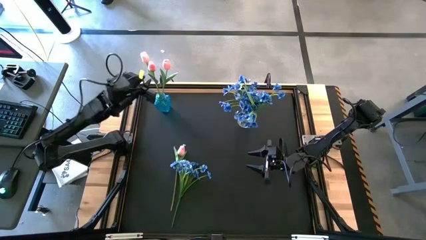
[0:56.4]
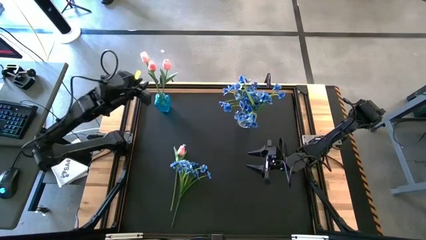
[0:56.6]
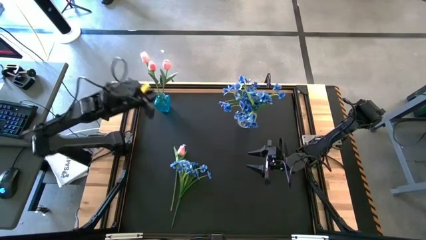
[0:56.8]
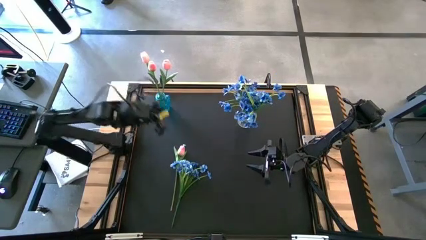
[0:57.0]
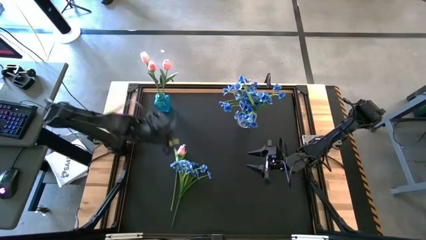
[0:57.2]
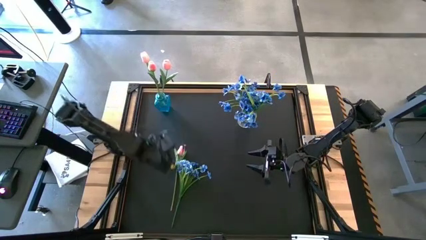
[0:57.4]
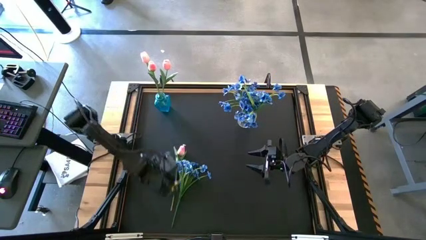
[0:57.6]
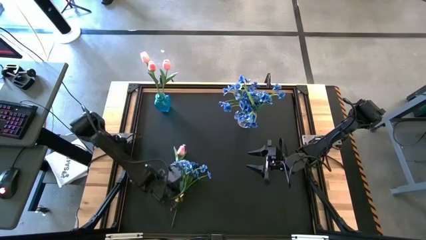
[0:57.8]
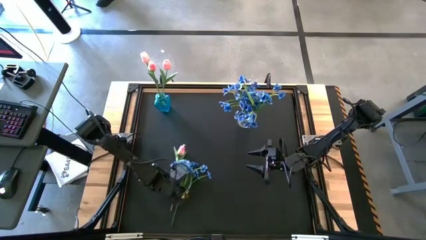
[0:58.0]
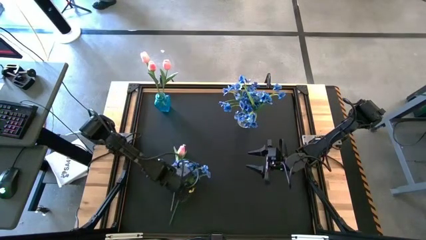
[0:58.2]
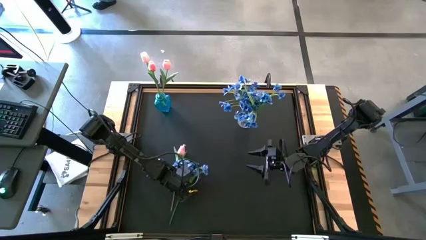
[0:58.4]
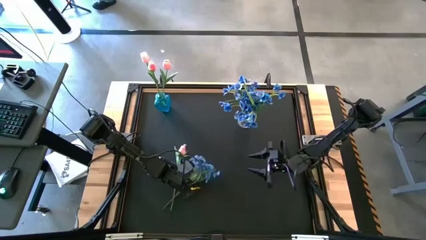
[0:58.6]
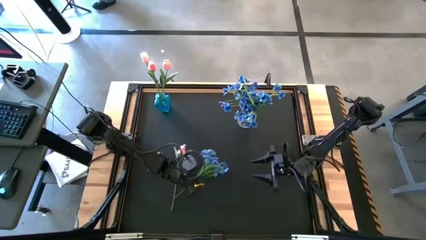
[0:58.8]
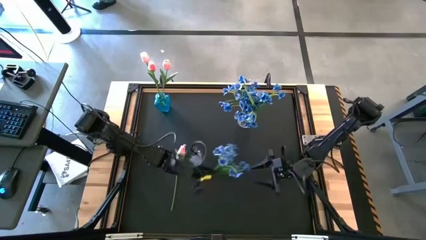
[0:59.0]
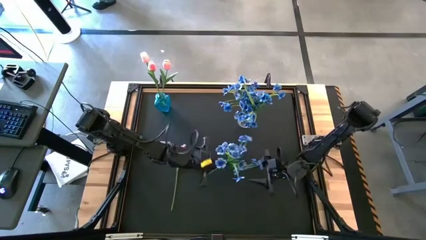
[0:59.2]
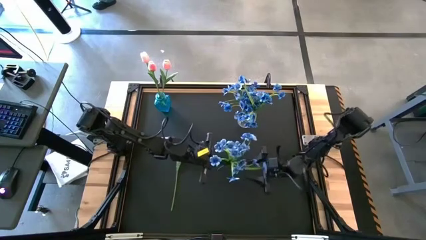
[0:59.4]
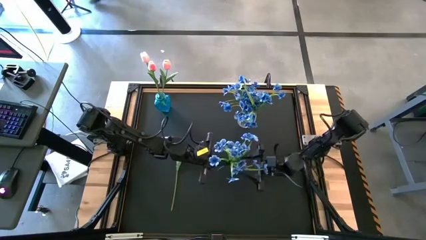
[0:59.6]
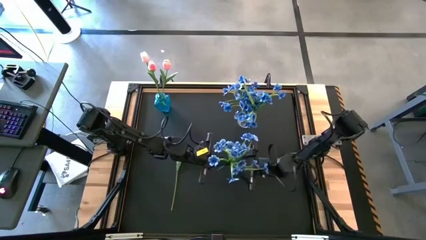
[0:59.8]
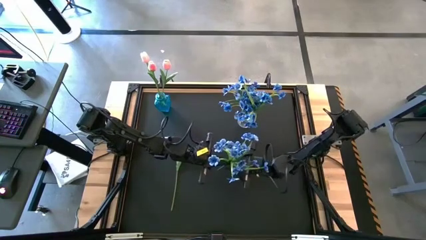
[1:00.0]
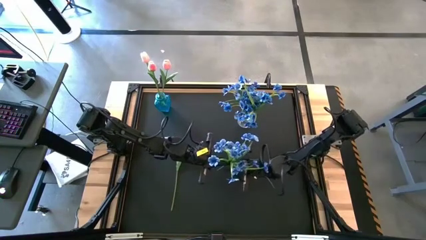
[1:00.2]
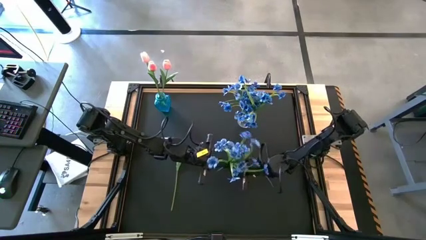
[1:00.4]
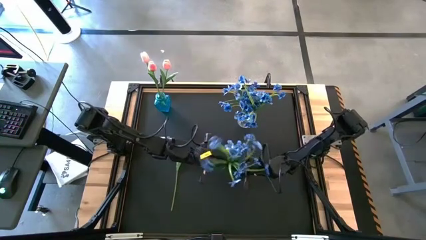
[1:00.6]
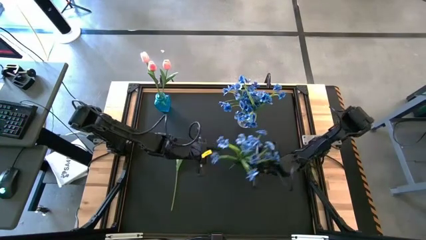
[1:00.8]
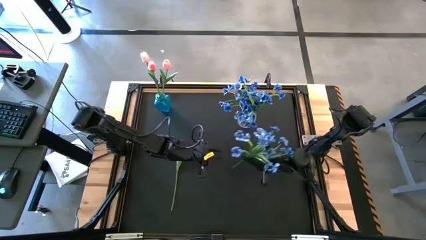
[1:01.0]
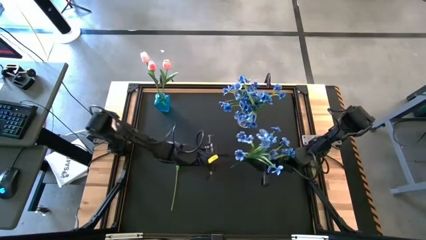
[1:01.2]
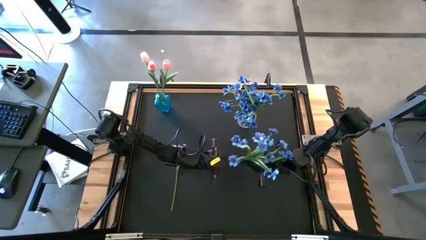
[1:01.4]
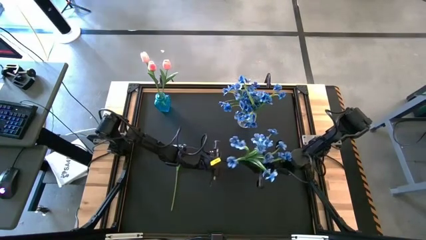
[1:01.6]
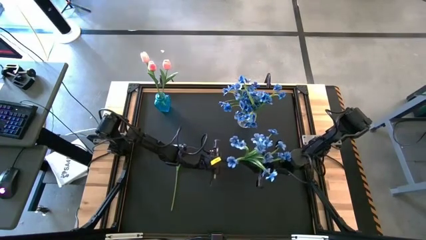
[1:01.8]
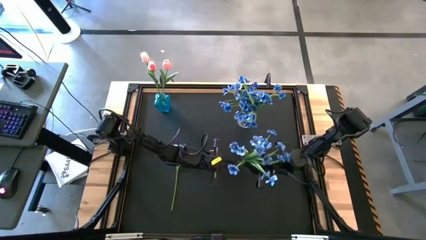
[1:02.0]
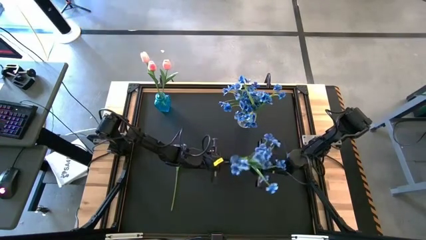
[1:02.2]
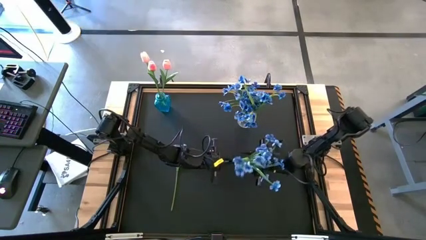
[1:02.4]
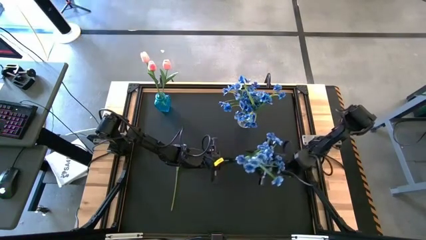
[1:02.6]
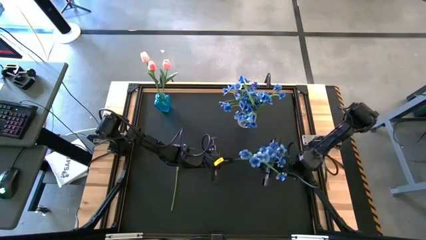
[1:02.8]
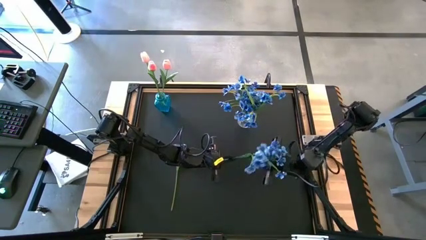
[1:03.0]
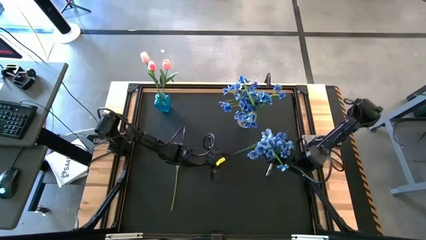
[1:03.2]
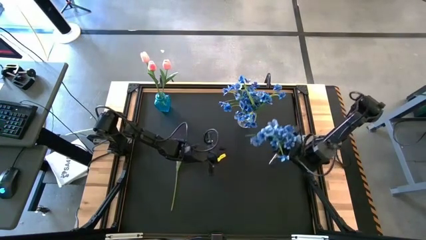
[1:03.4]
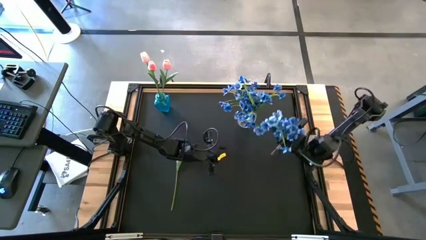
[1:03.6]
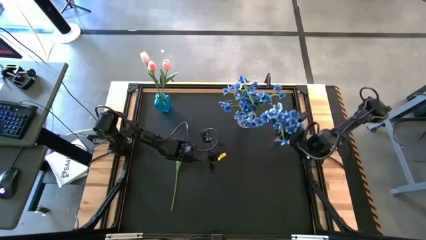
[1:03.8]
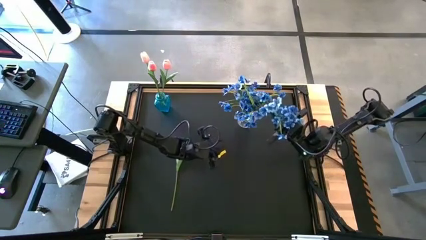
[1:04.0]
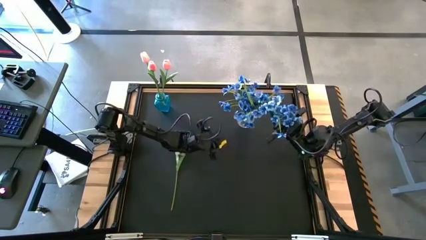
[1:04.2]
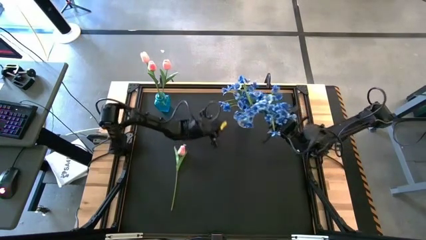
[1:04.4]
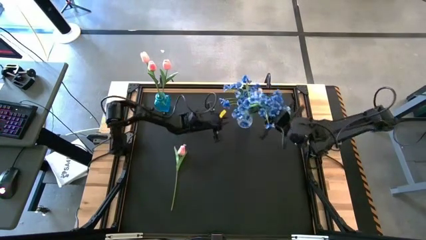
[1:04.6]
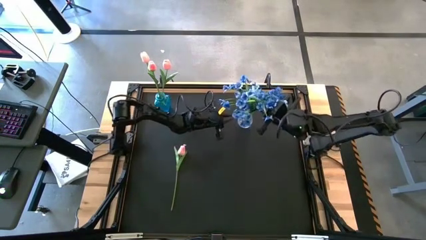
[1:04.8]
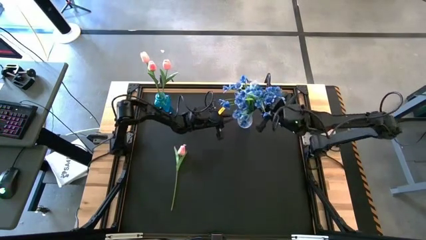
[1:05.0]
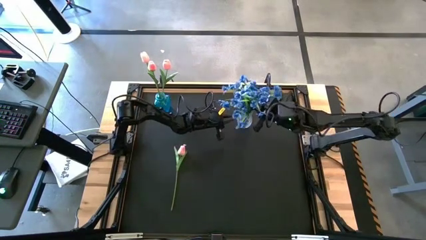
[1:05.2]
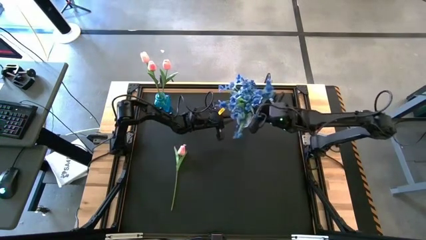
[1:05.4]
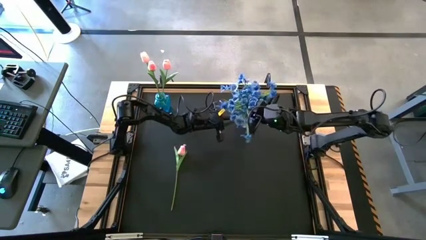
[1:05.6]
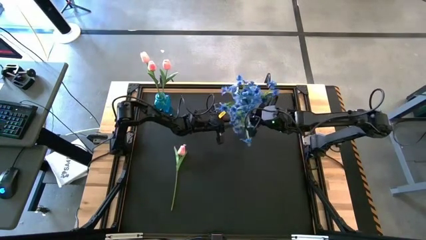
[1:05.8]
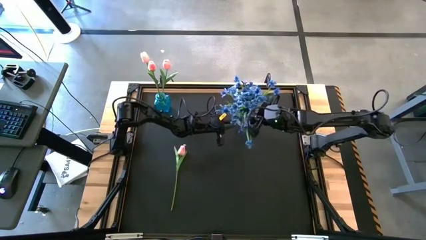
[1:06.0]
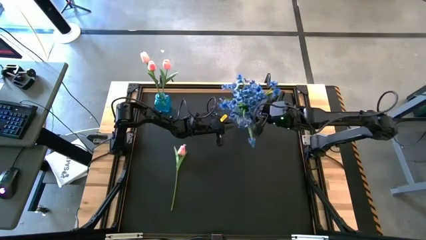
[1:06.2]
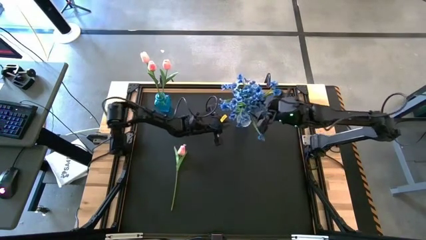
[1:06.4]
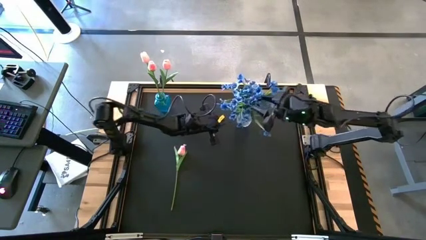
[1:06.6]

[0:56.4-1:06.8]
Task: Sort flowers into vase by color
Put the blue flowers into the transparent vase
